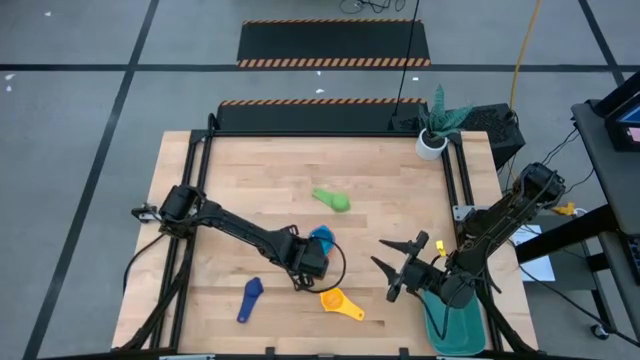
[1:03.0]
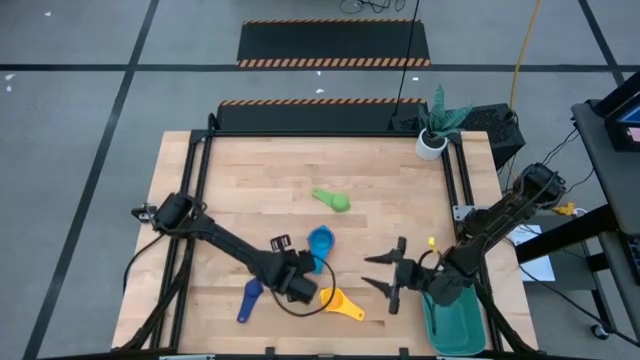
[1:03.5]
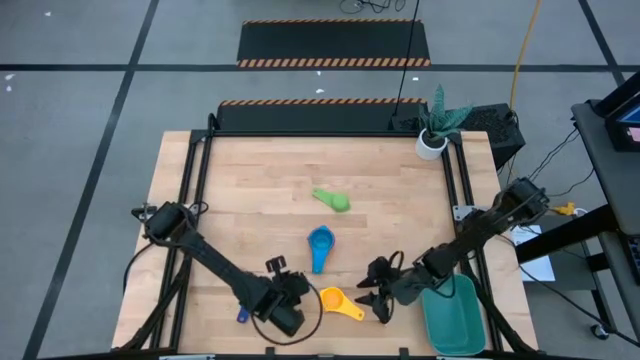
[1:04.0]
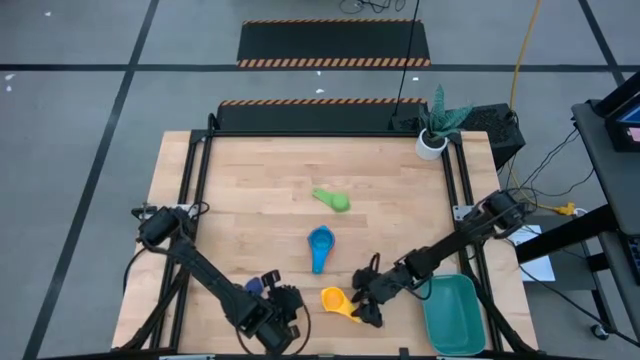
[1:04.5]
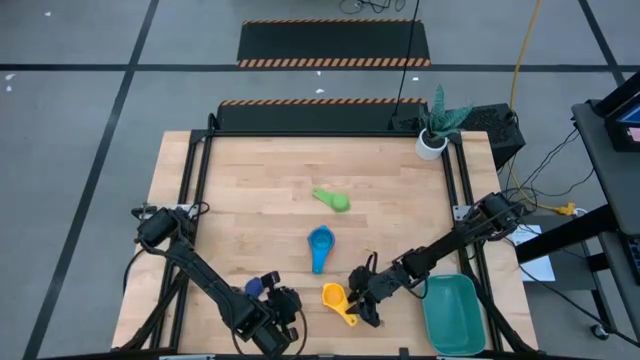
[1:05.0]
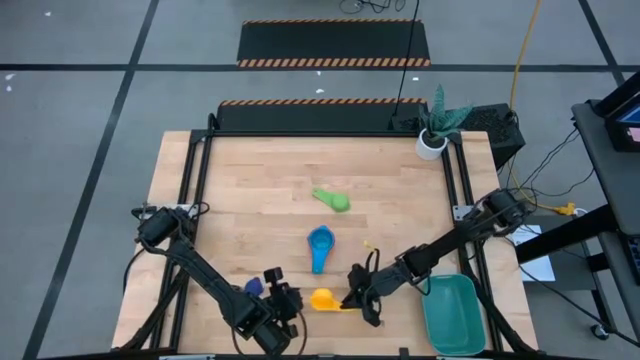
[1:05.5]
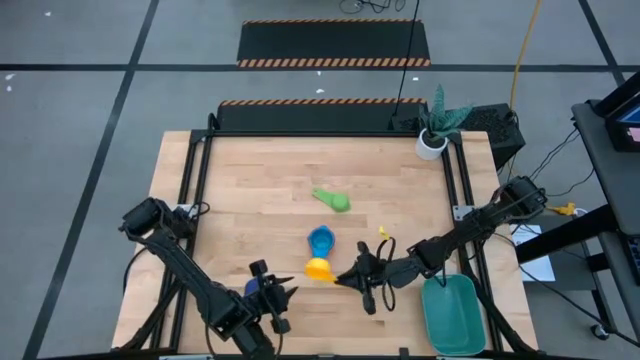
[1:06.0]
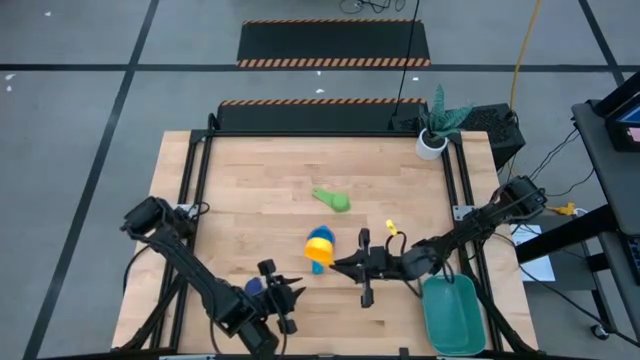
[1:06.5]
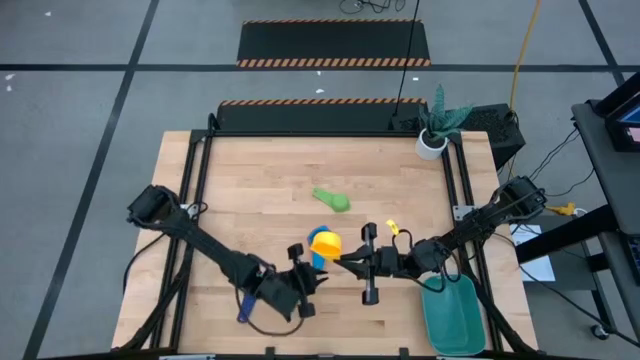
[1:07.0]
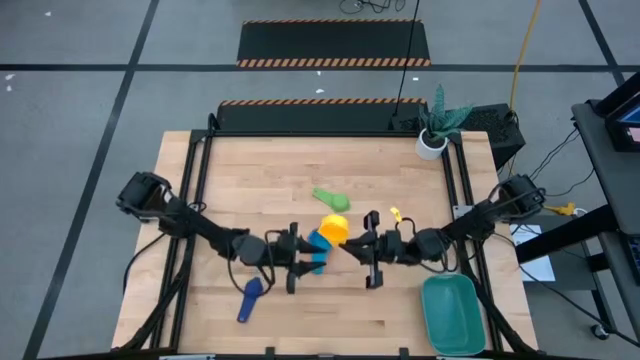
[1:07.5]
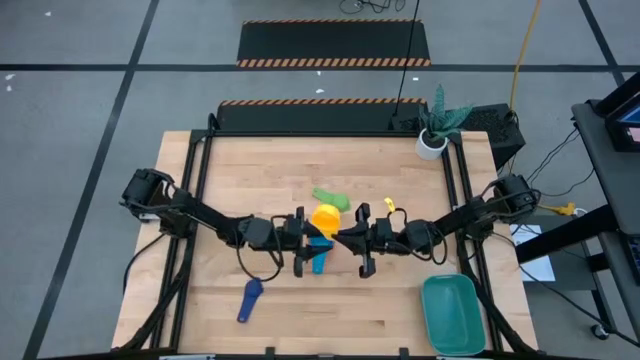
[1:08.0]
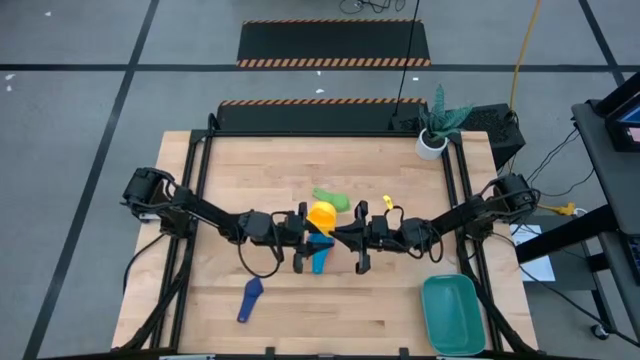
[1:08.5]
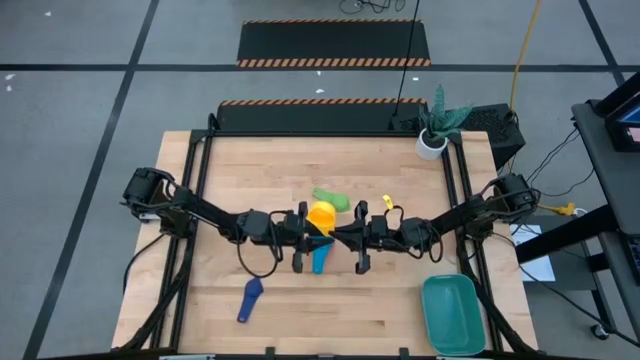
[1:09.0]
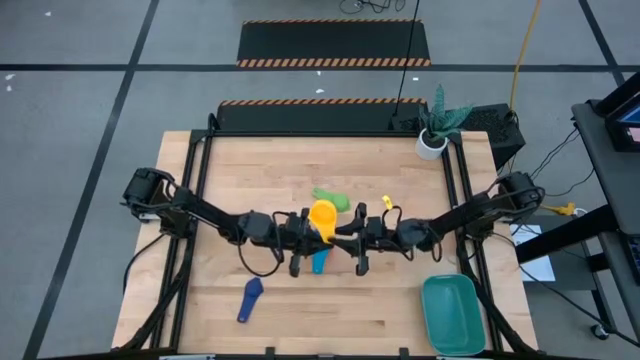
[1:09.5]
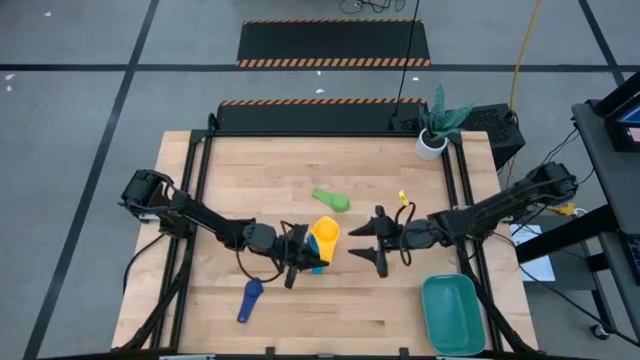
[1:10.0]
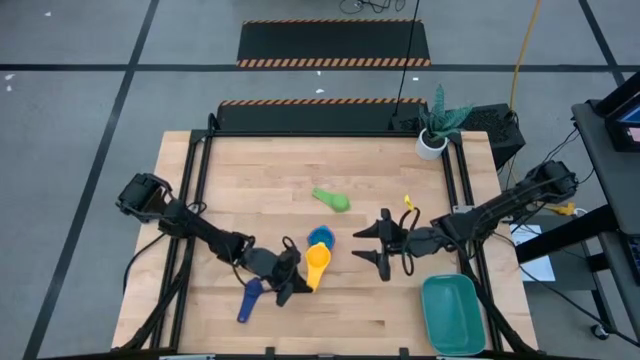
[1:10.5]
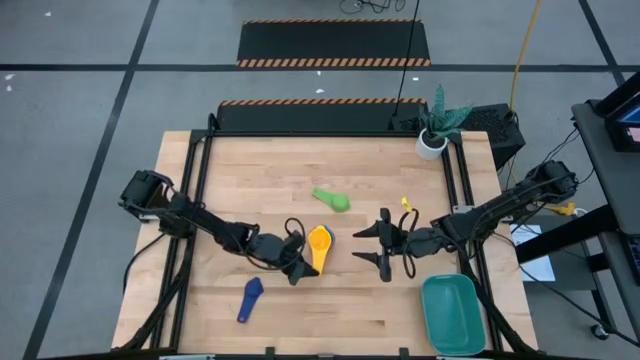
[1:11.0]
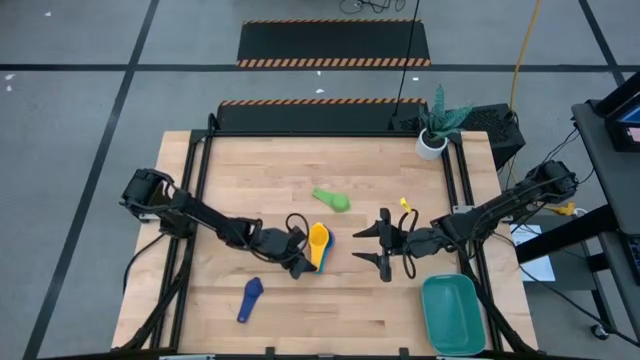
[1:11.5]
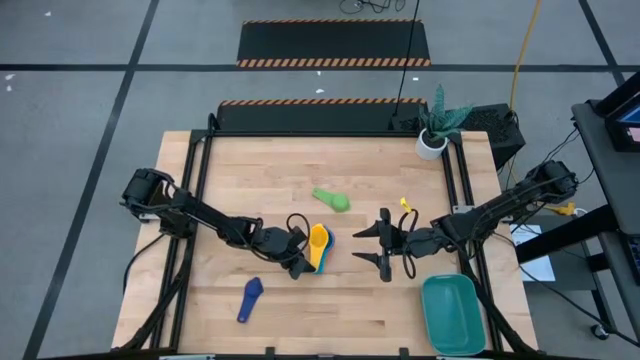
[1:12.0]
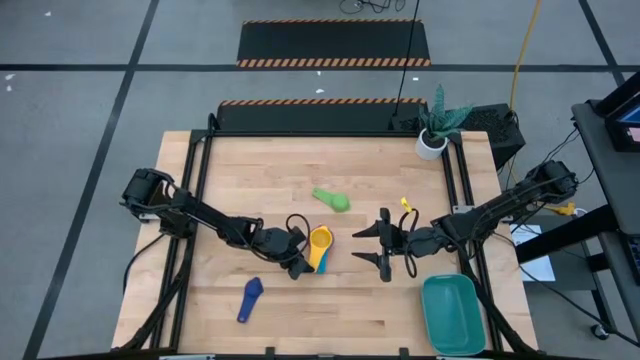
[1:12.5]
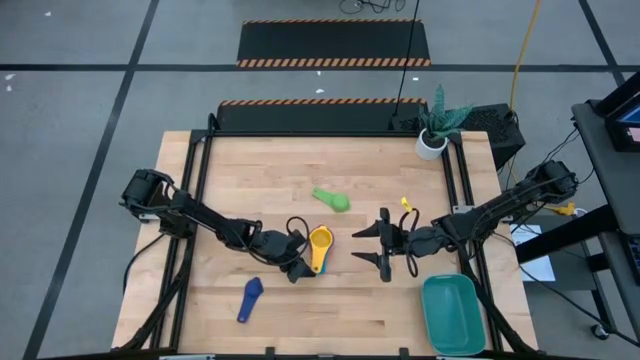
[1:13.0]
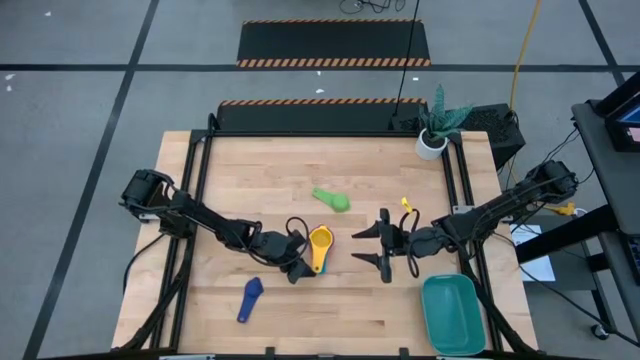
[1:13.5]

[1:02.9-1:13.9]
Task: Nest measuring cups in basket
Stack the yellow measuring cup on top of the light blue measuring cup

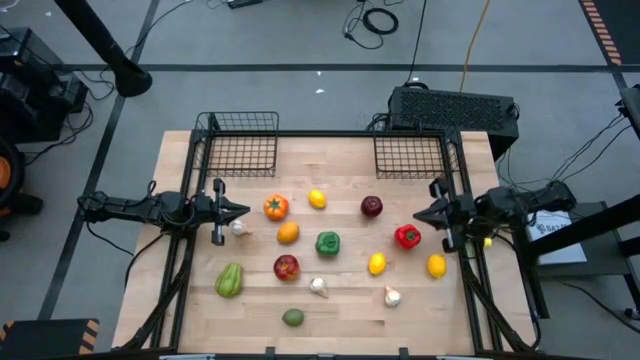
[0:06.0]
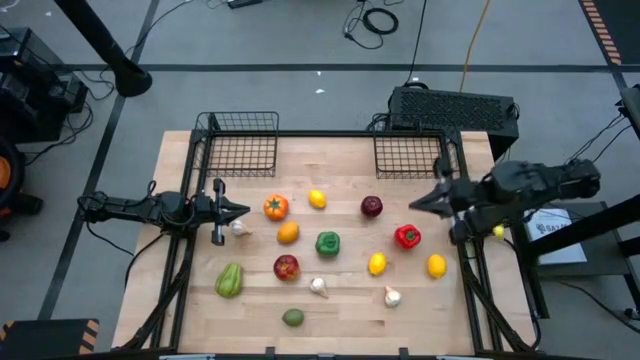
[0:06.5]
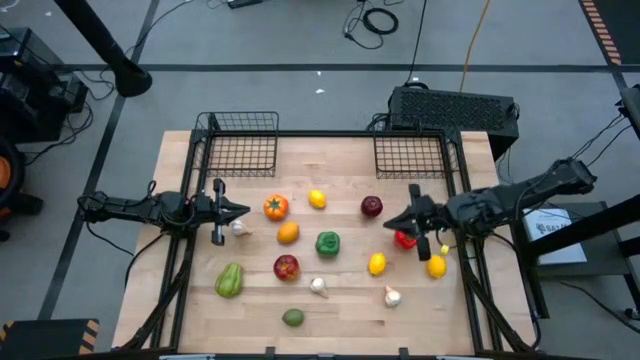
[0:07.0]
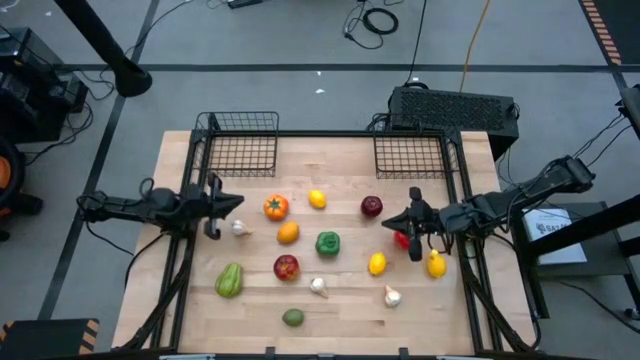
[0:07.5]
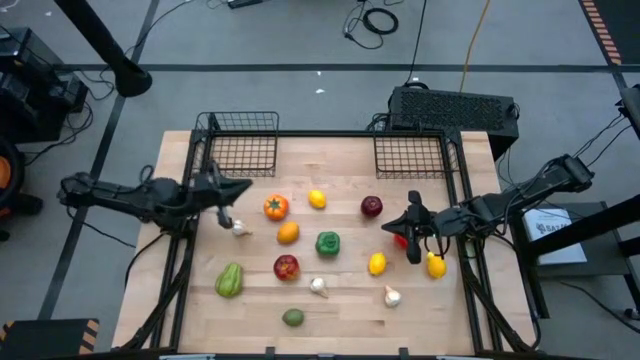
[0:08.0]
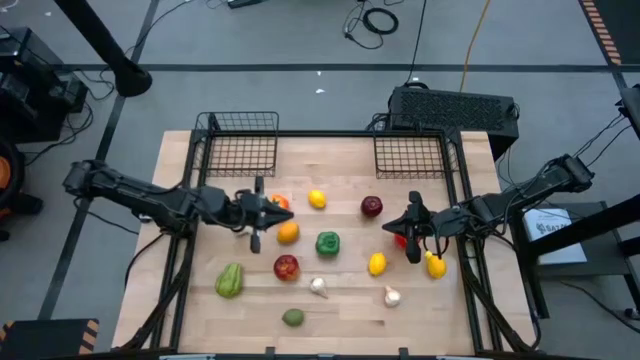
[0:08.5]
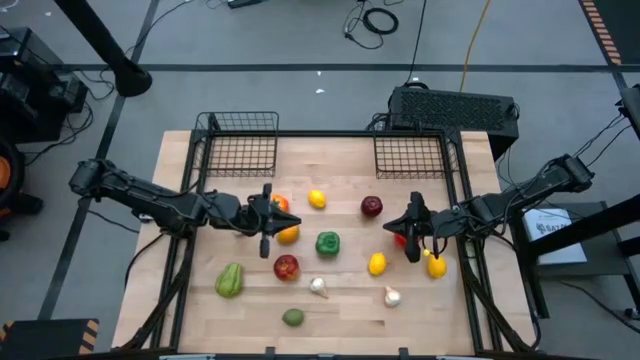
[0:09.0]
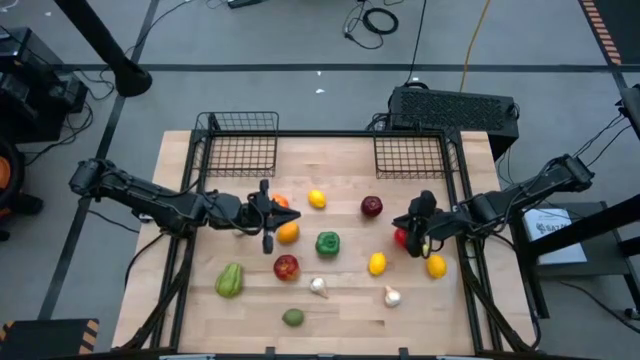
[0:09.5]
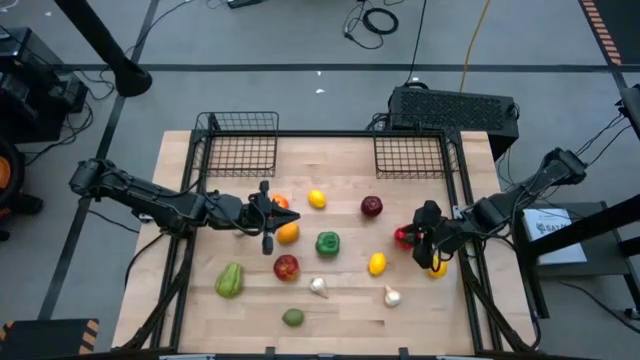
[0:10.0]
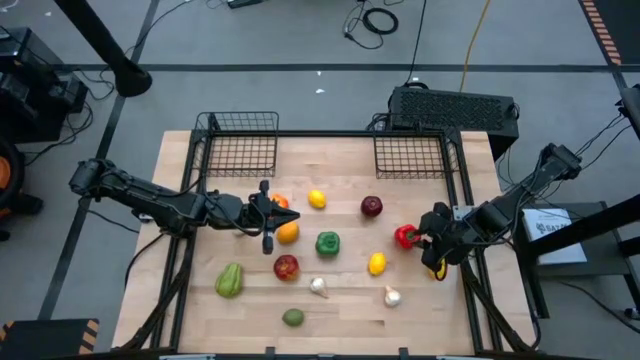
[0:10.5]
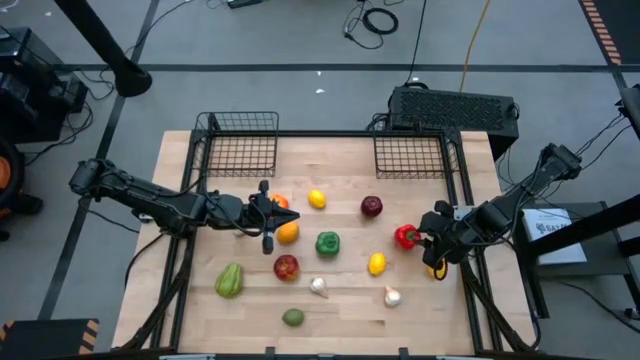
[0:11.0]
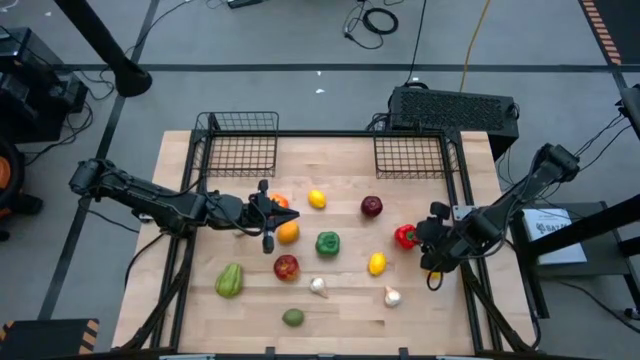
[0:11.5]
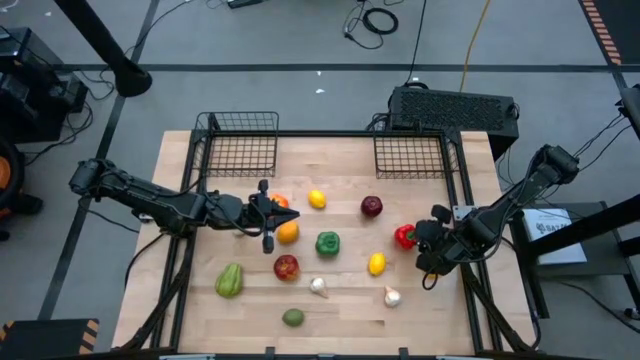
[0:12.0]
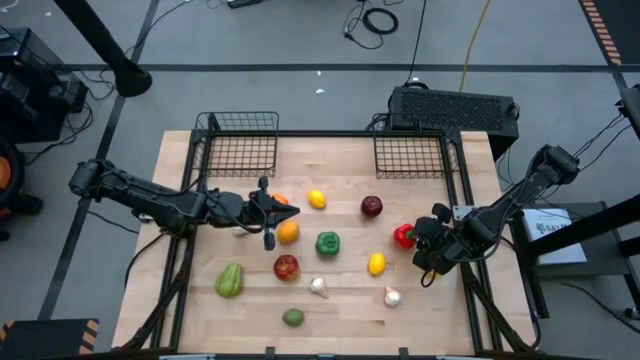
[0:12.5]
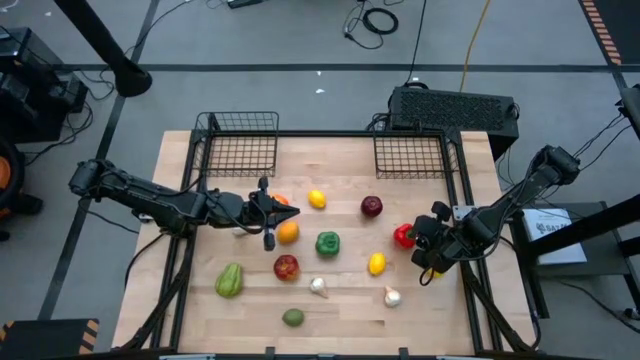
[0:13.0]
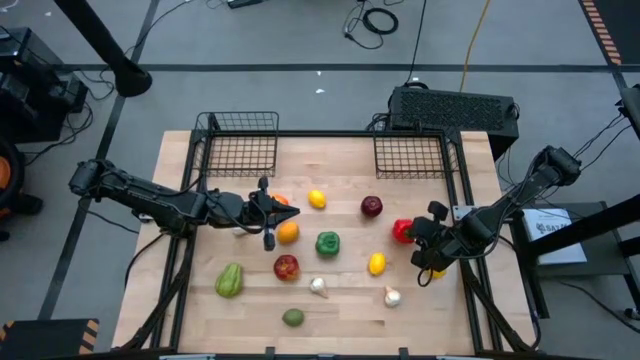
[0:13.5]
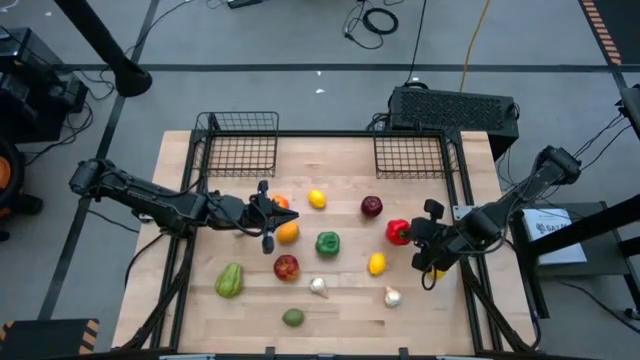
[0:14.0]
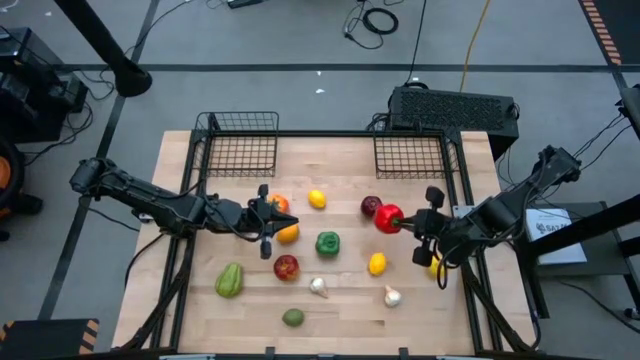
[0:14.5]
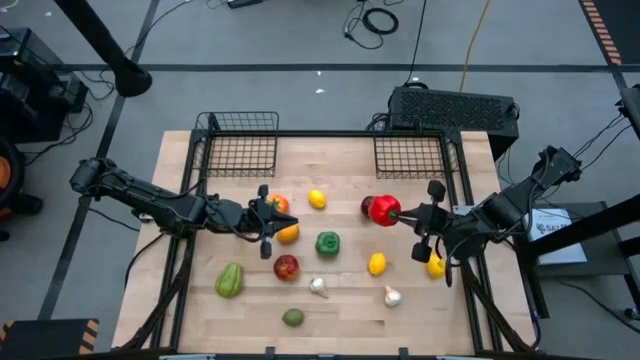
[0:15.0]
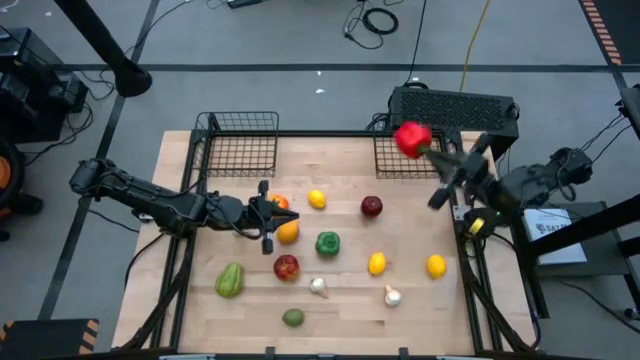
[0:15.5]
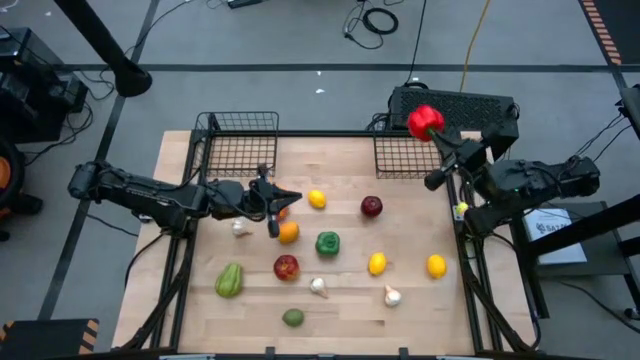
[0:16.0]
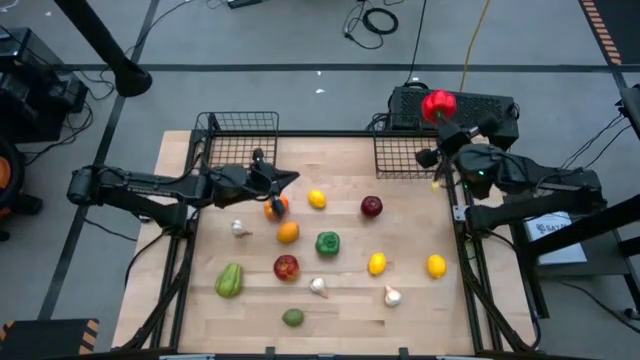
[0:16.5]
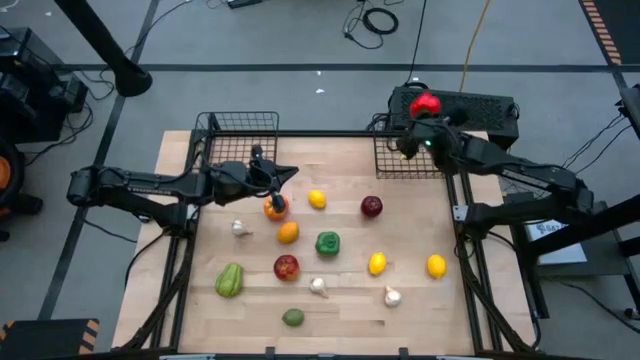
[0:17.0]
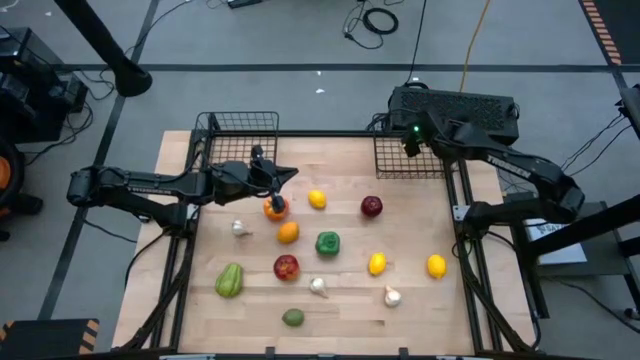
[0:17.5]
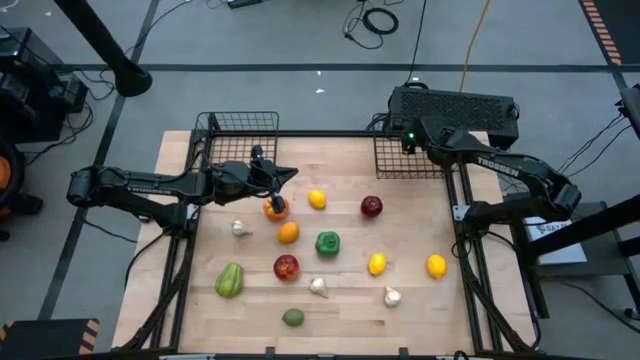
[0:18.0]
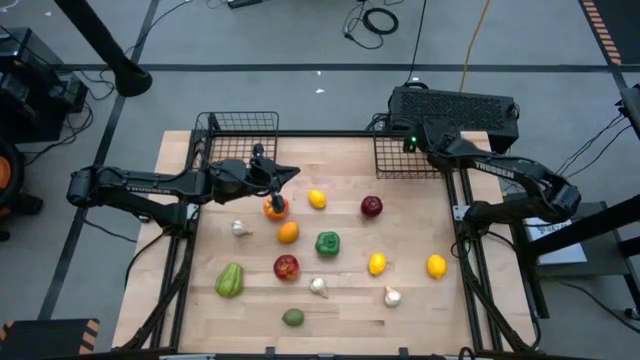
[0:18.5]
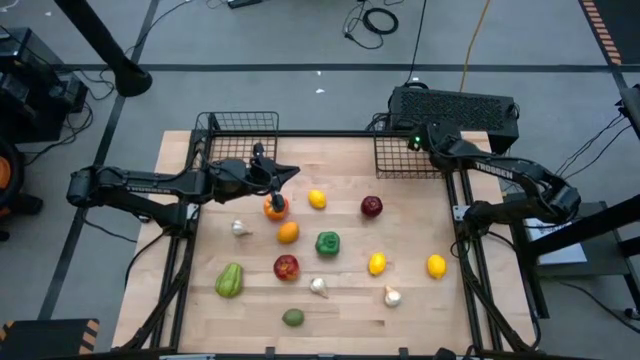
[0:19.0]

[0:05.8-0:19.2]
Task: Sort produce into baskets
Put the red bell pepper in the right basket
